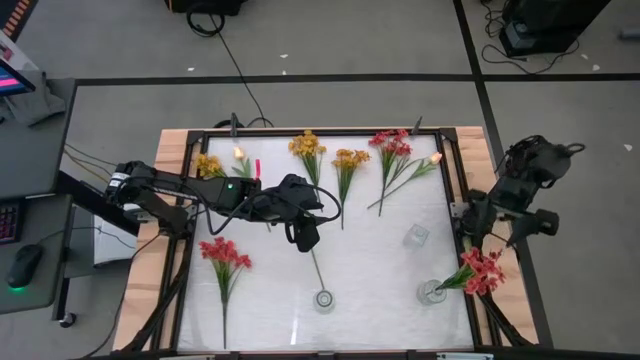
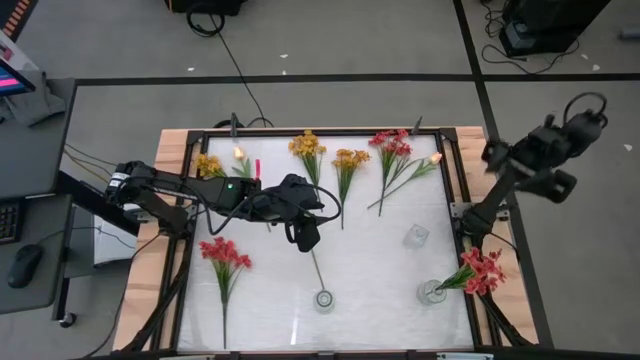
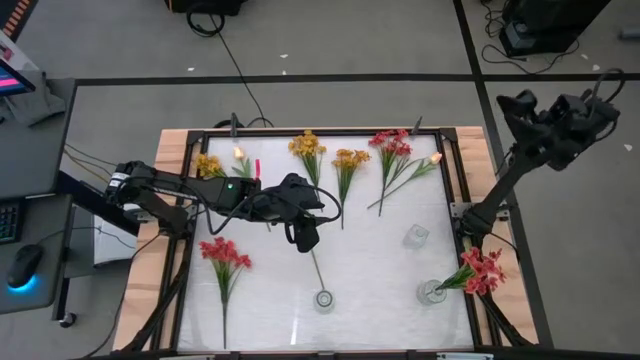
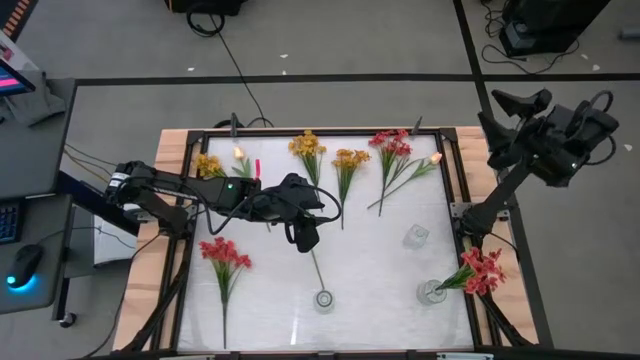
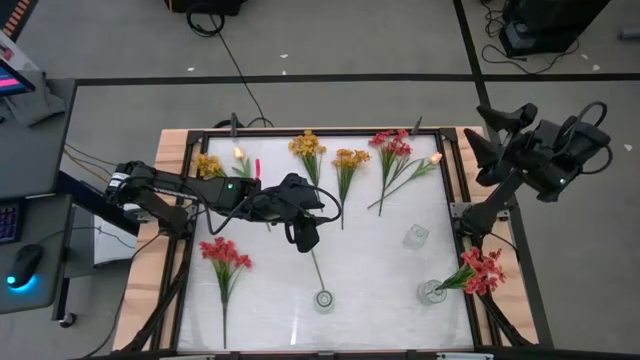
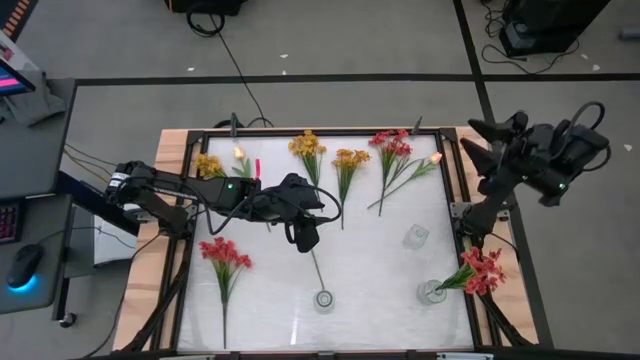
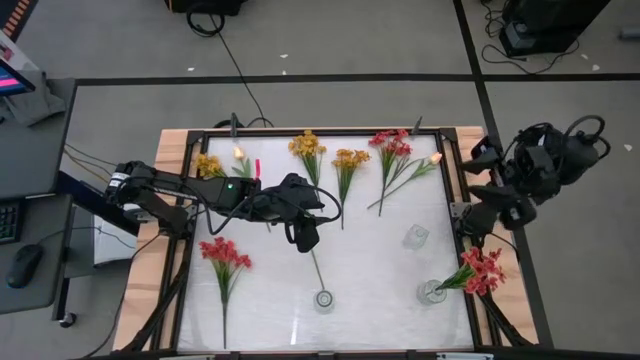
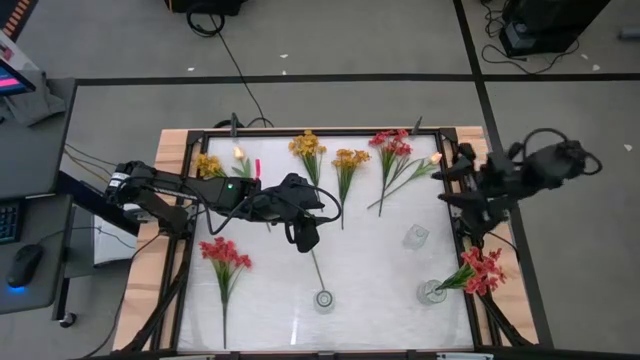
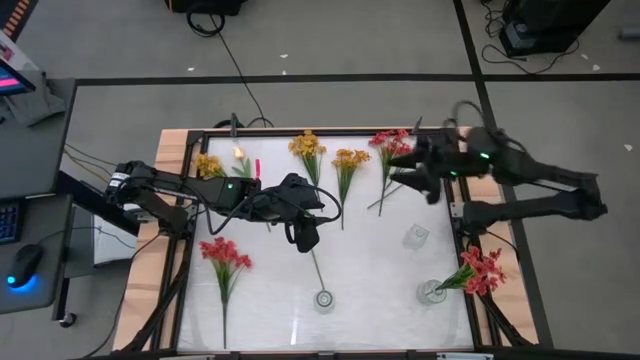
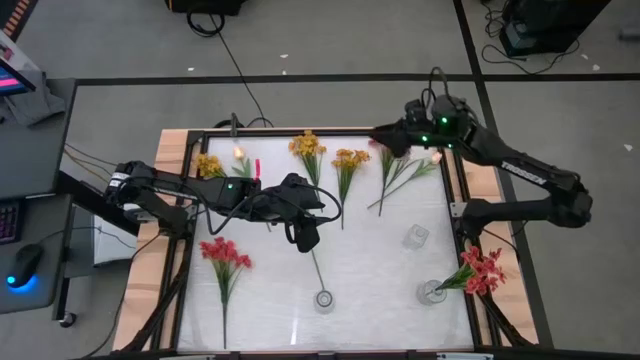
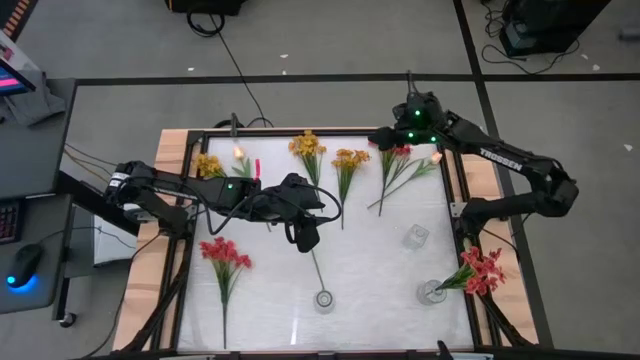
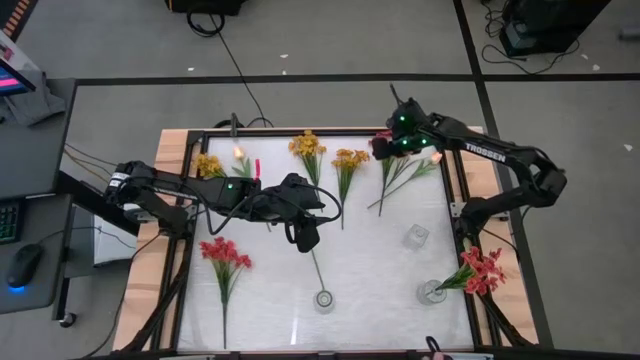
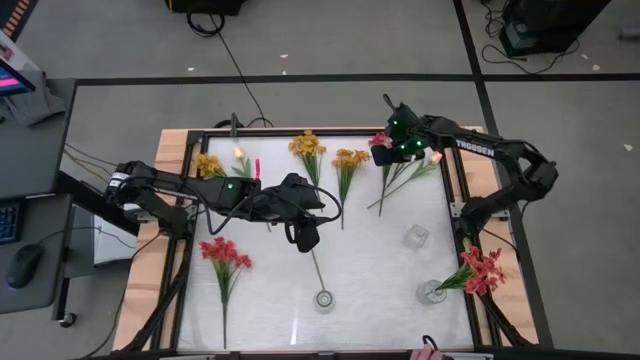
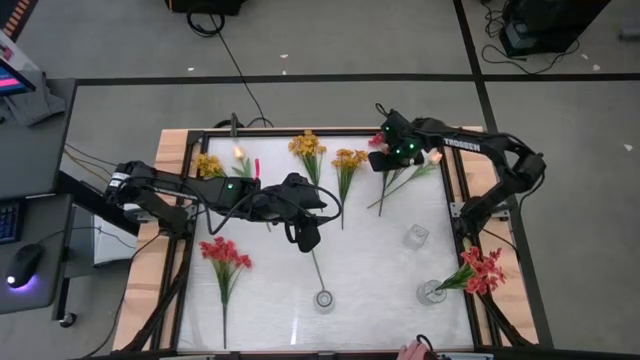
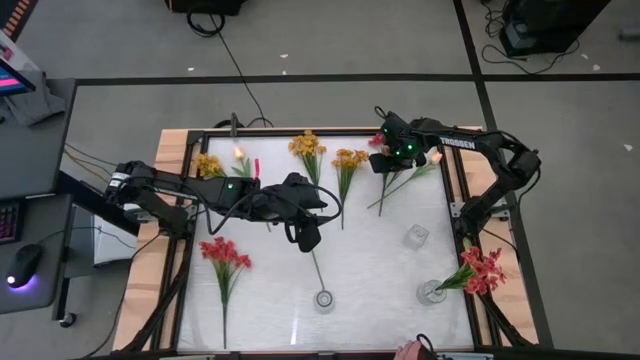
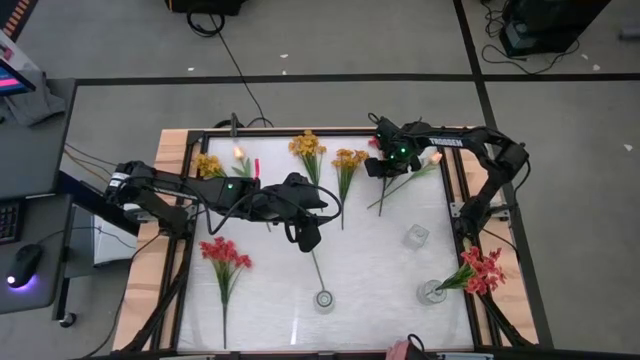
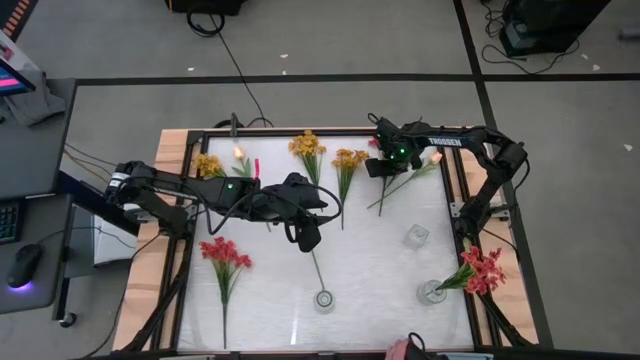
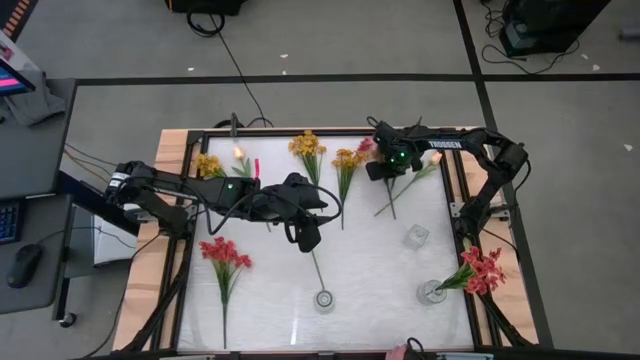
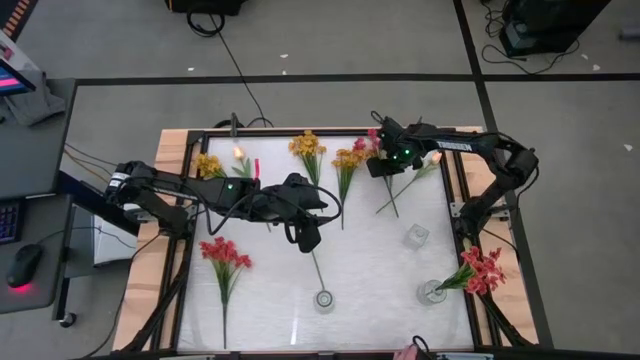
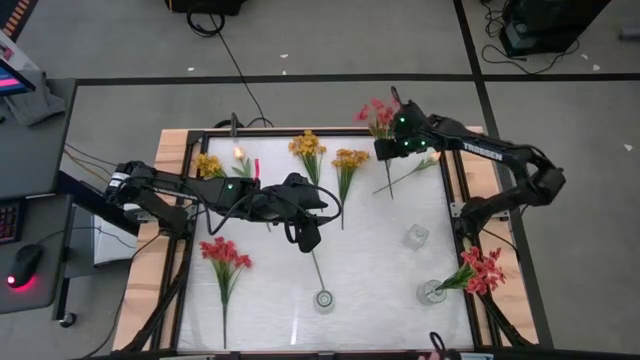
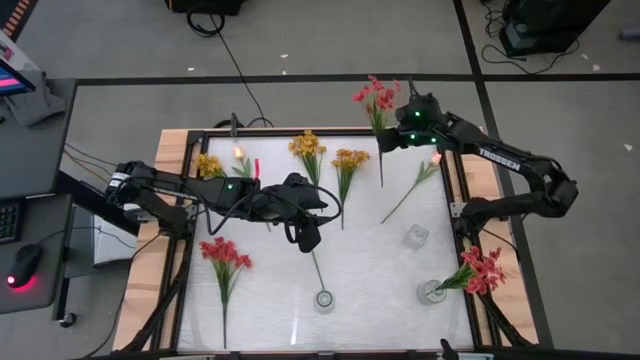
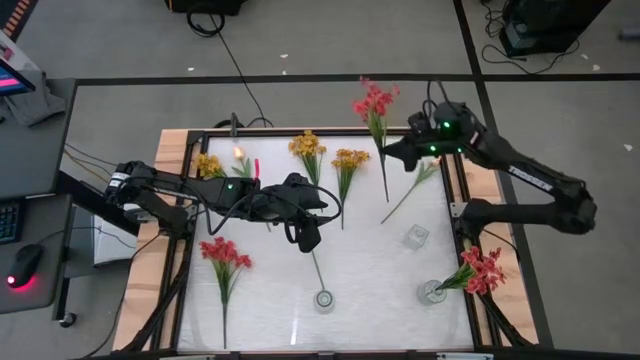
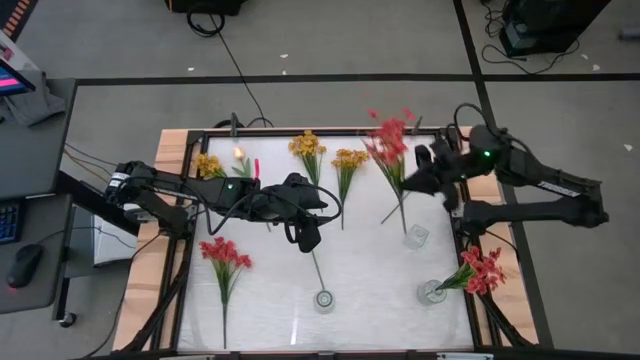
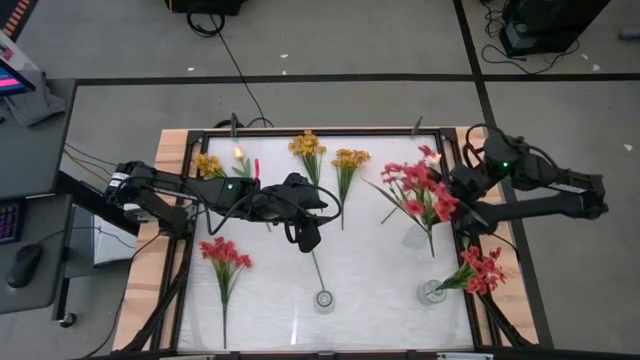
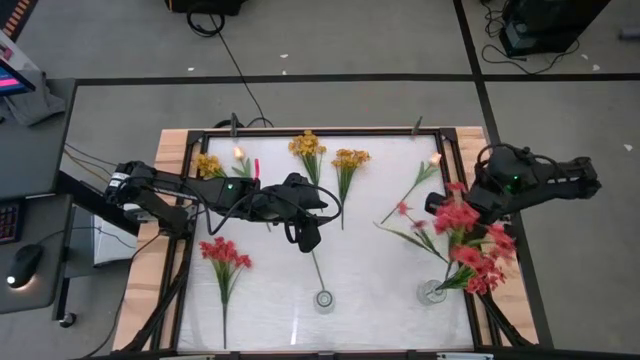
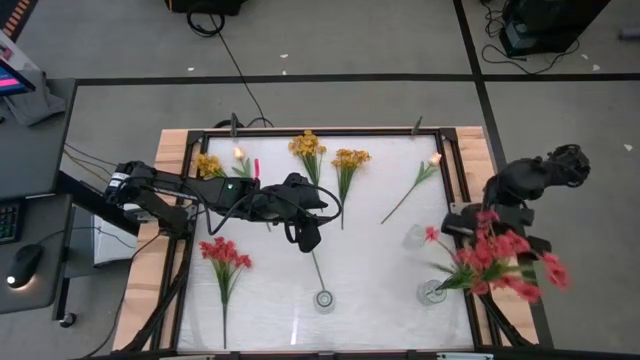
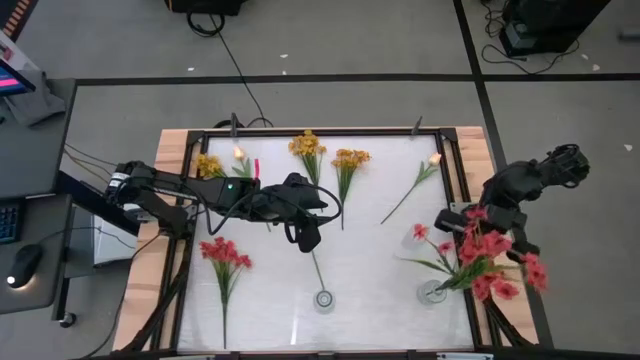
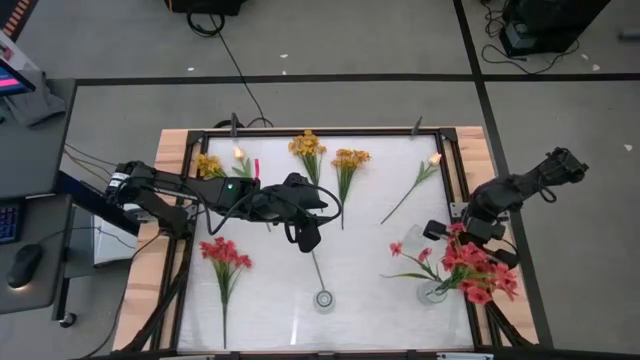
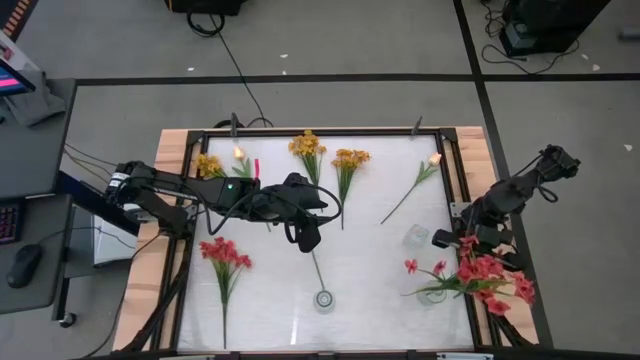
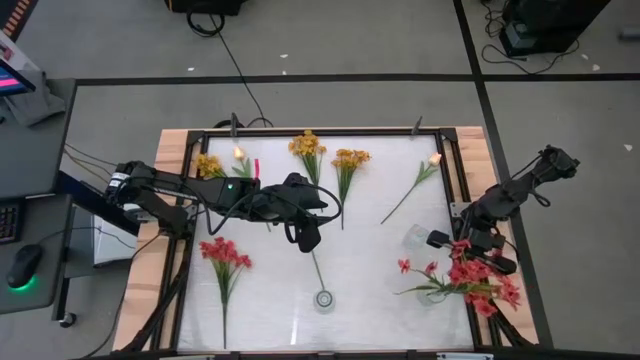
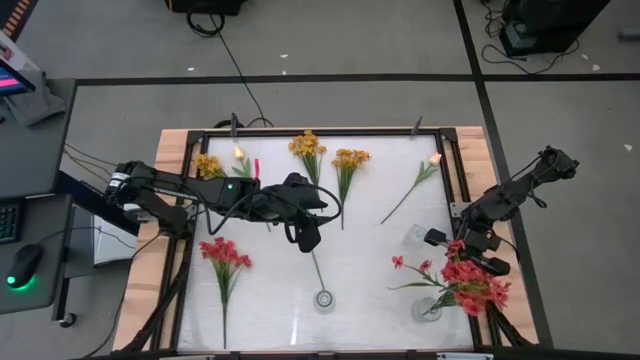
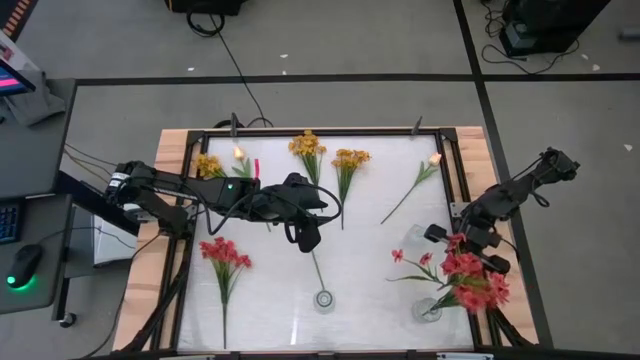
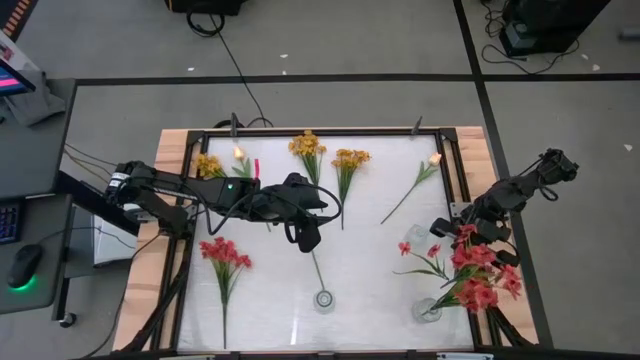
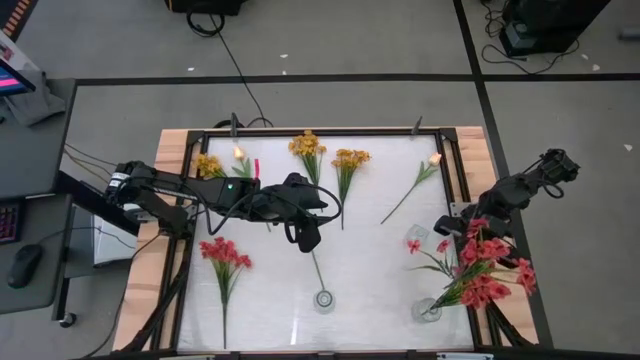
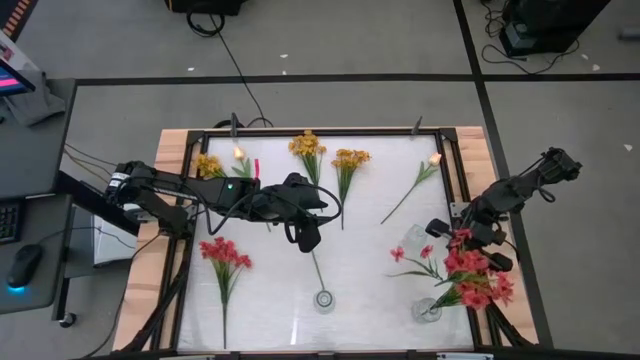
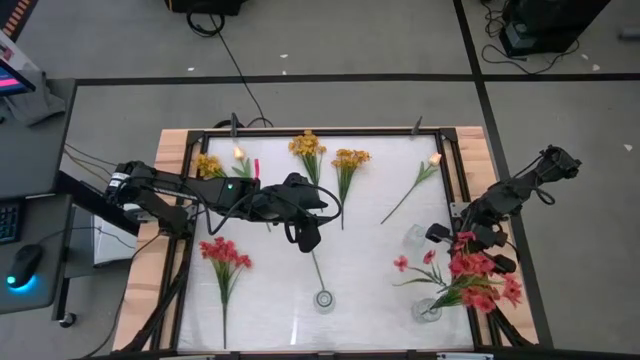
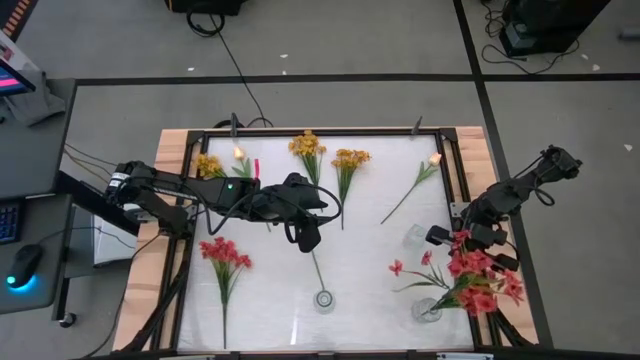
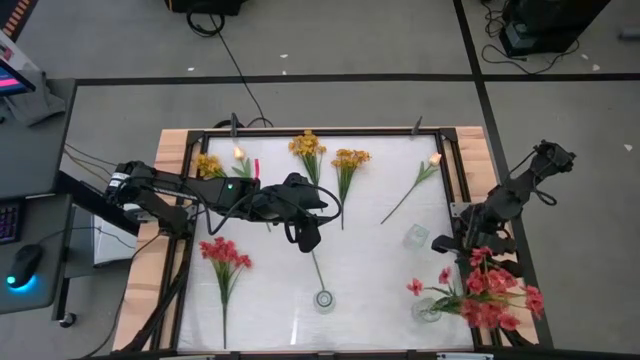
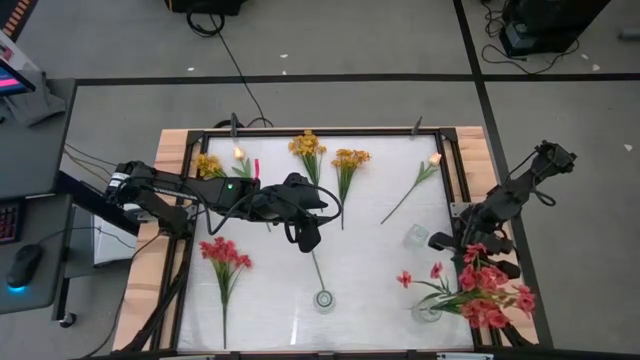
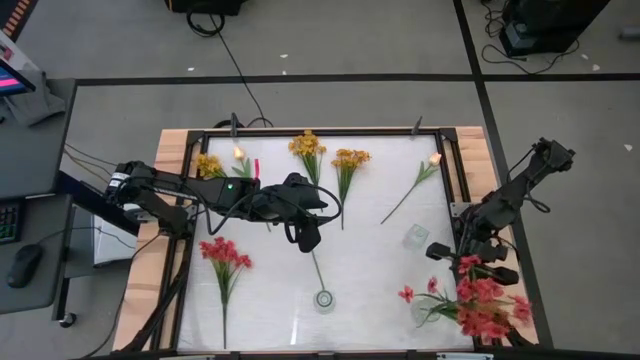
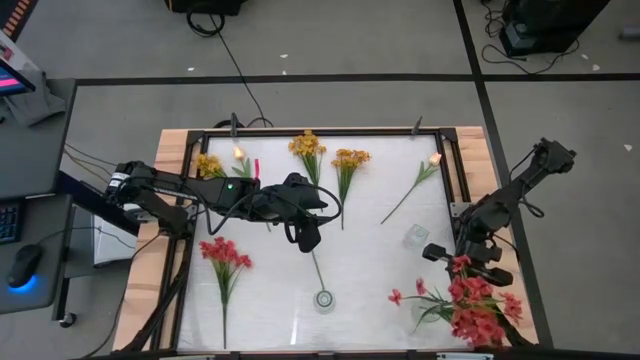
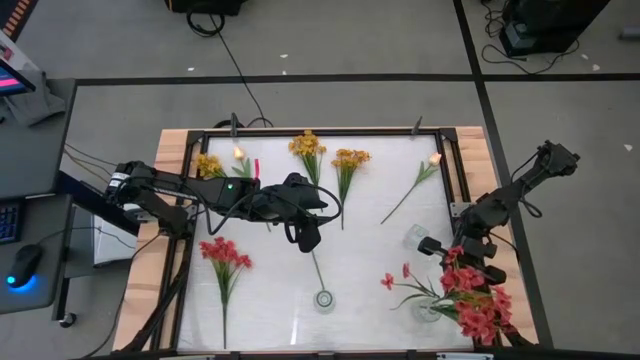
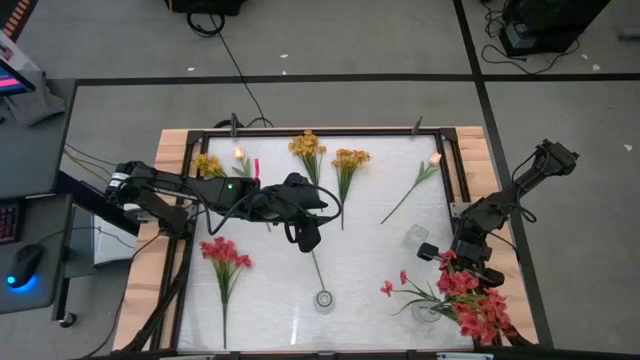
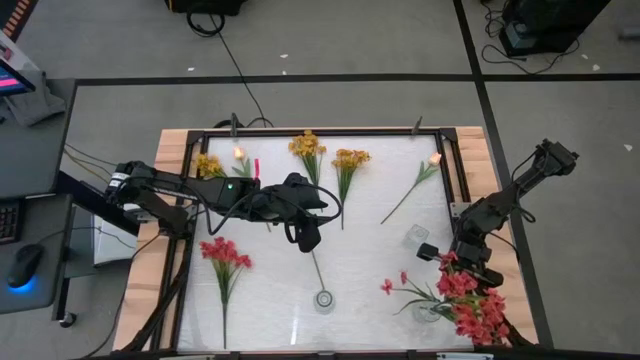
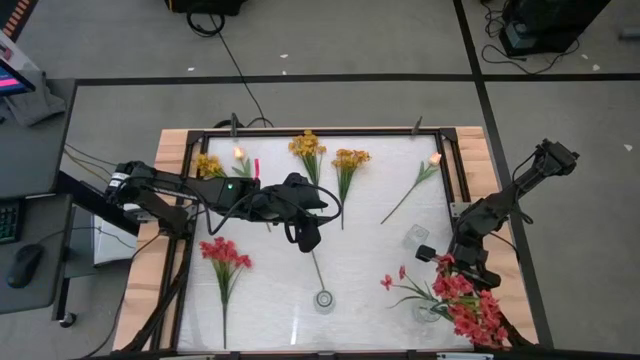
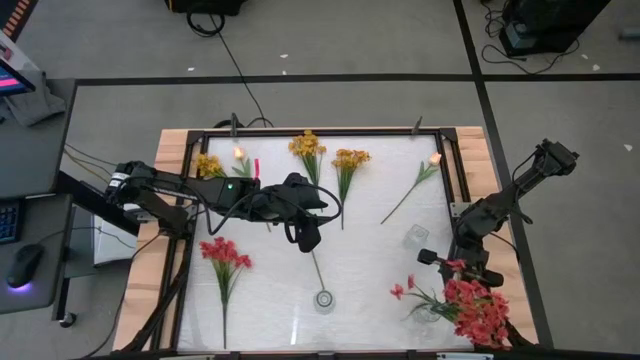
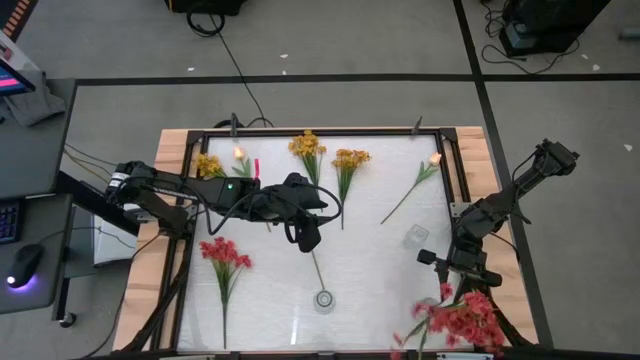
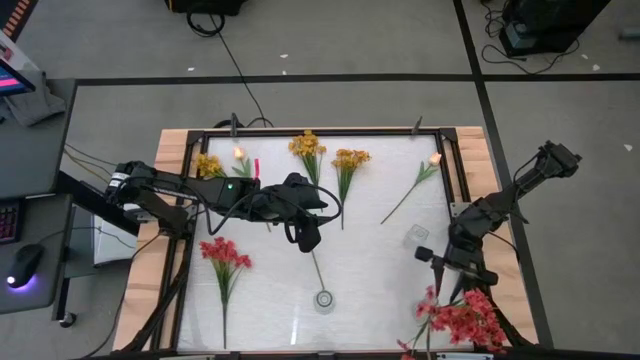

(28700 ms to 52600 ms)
Task: Sort flowers into vase by color
Put the top pink flowers into the bottom right transparent vase
